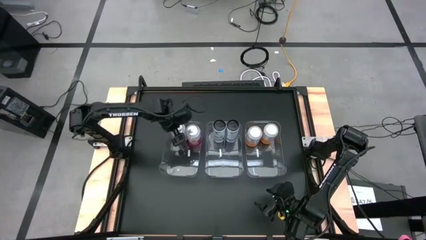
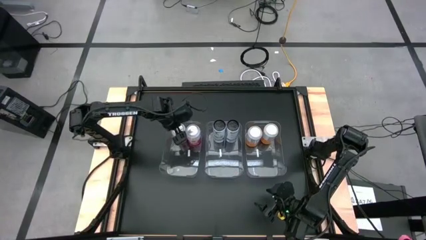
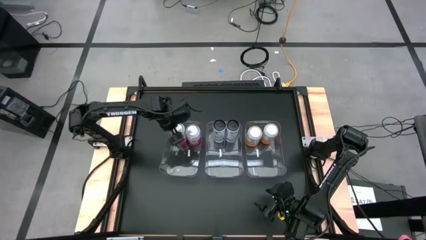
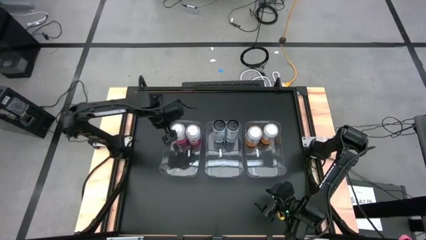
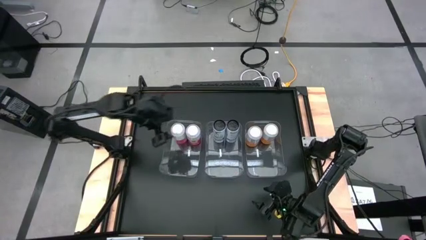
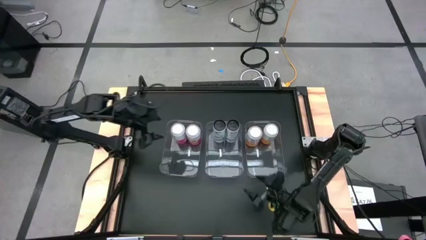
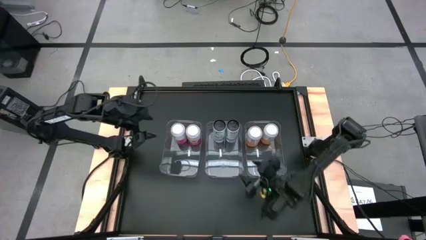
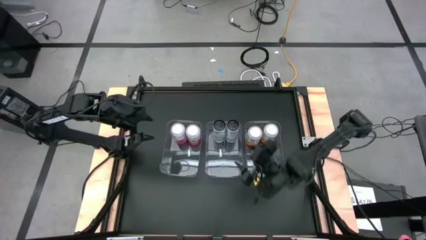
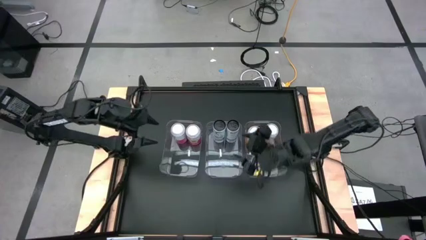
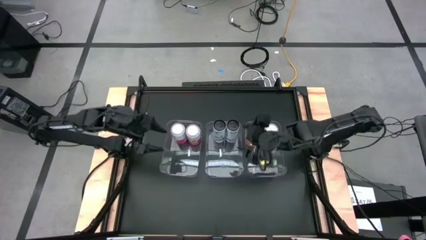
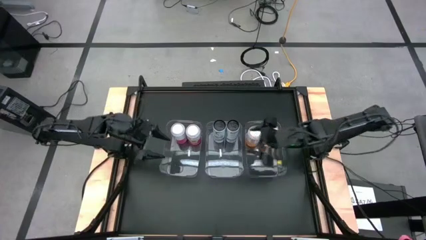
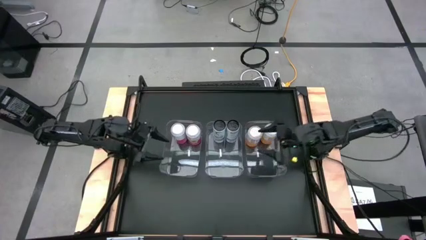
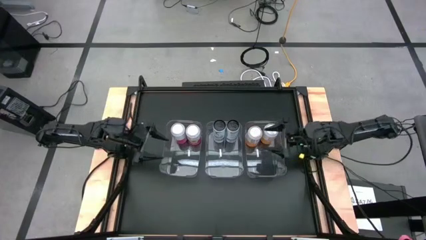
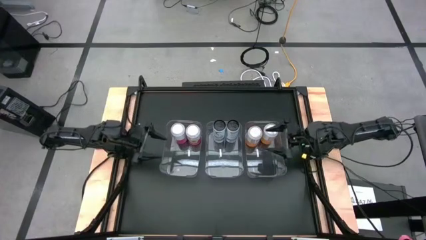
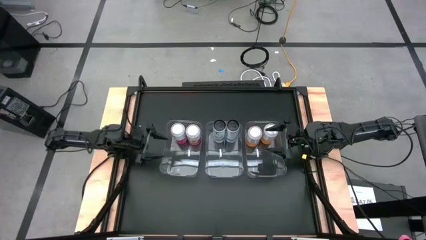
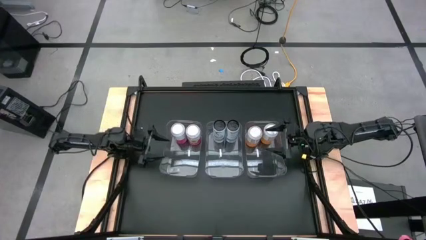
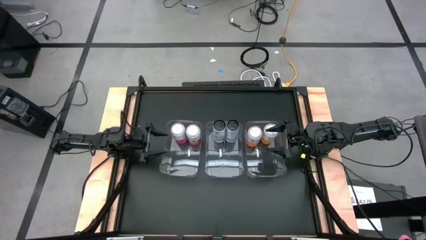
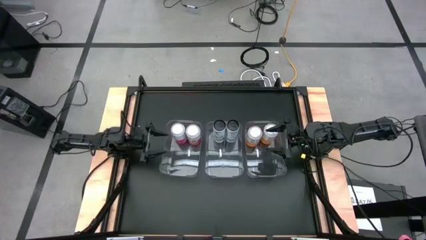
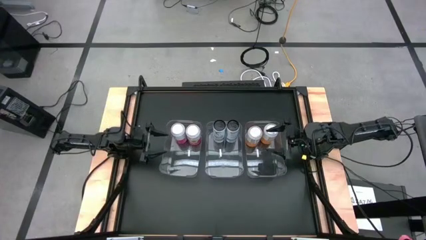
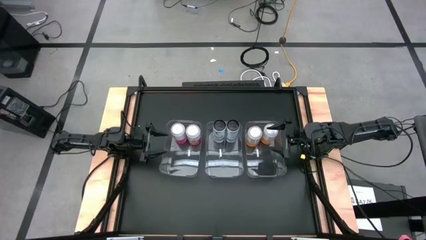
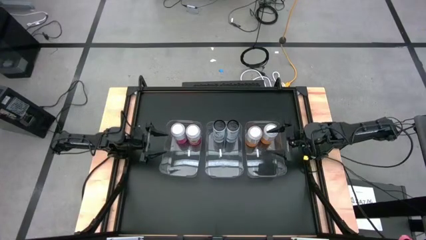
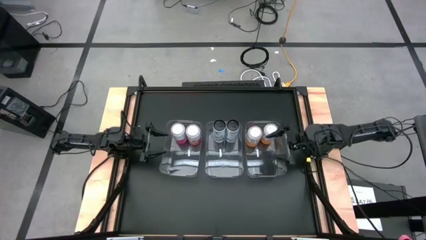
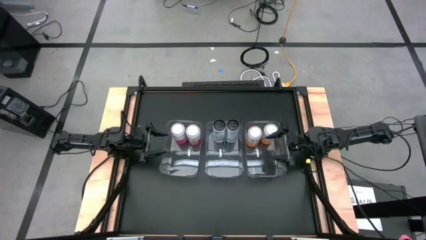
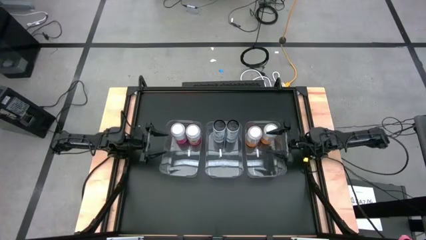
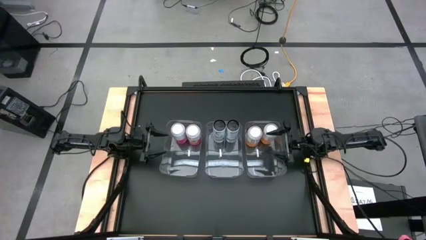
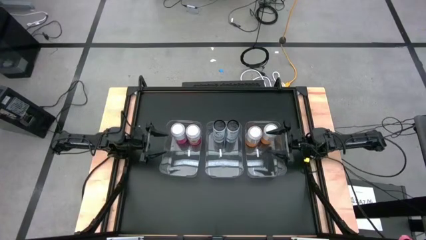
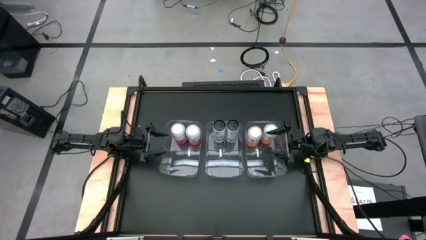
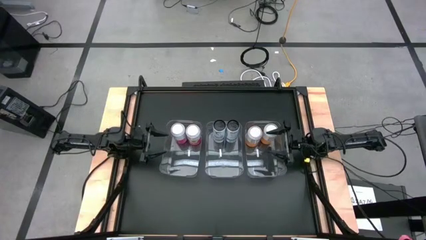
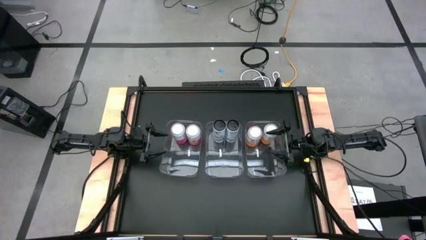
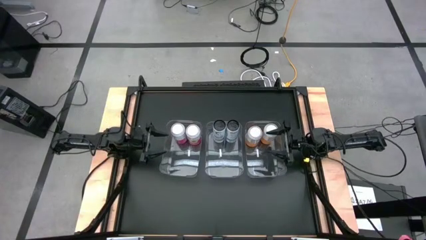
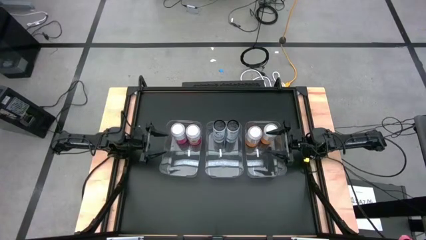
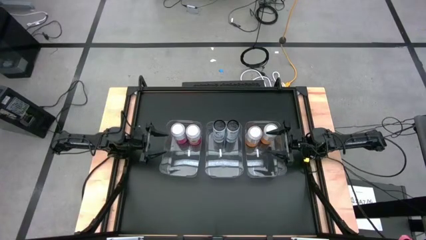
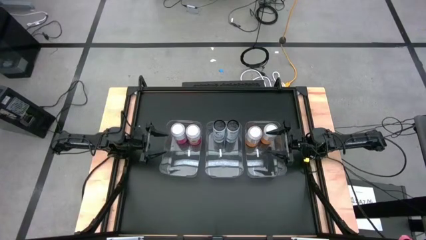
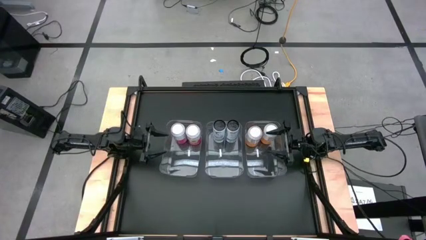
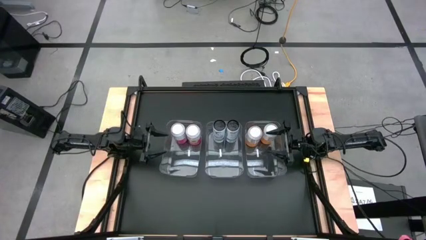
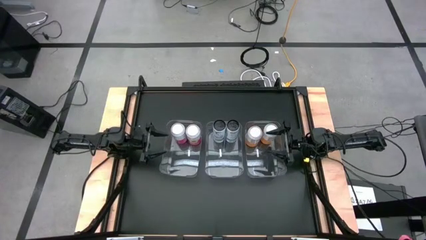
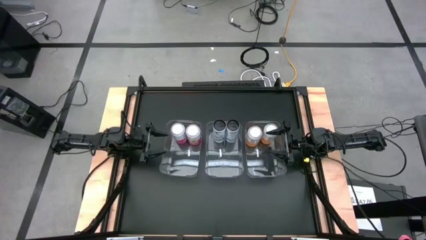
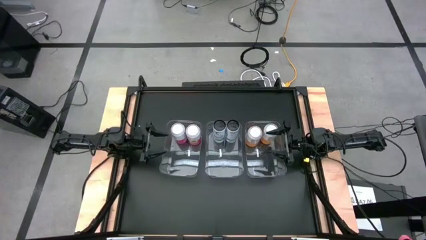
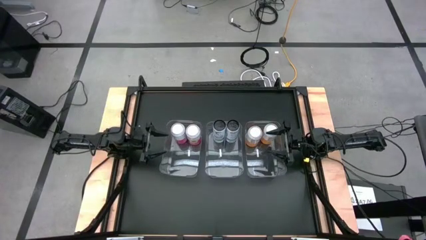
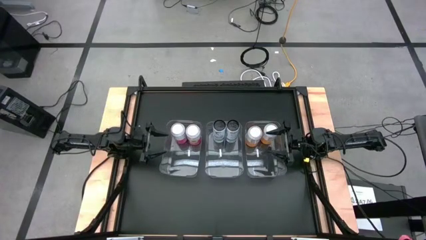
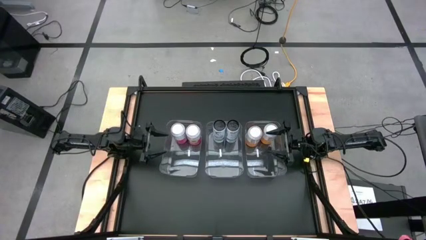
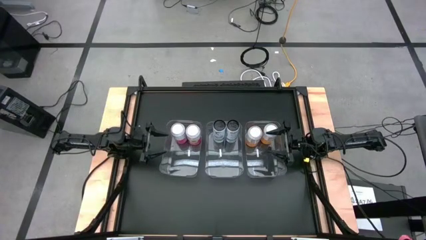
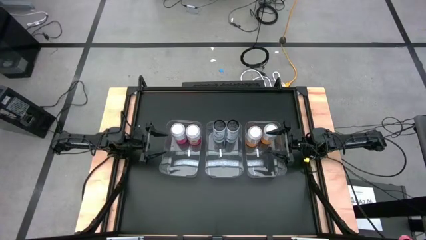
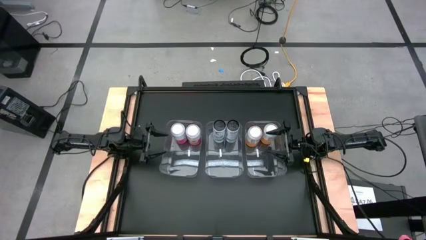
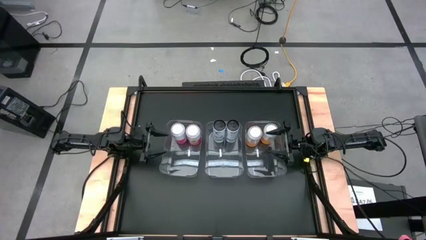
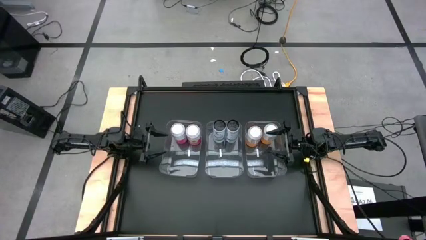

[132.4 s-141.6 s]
Task: Sort soda cans
Return to Home Position

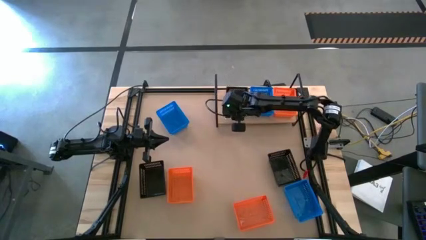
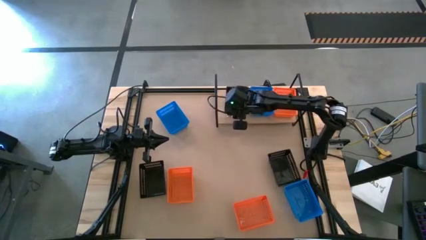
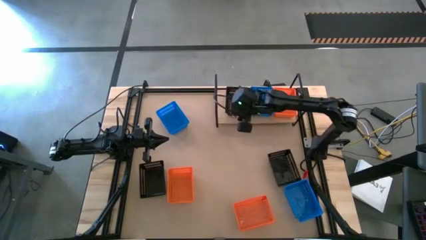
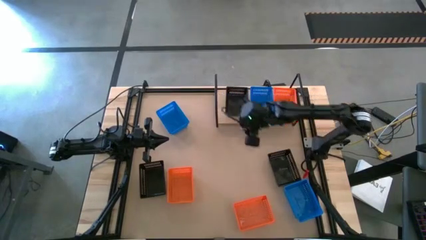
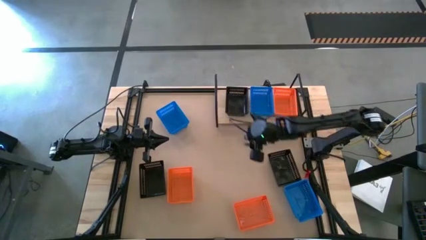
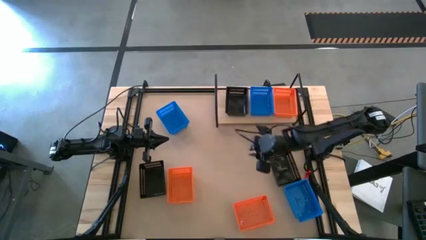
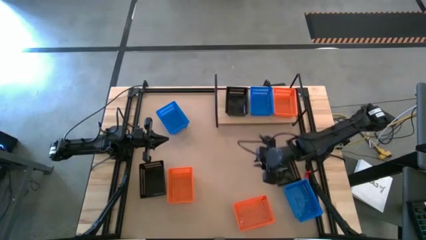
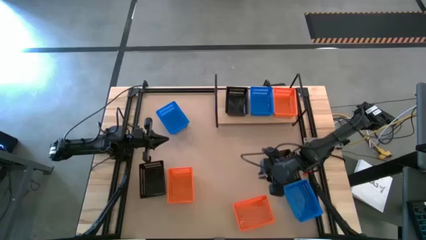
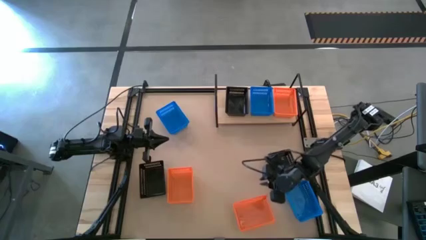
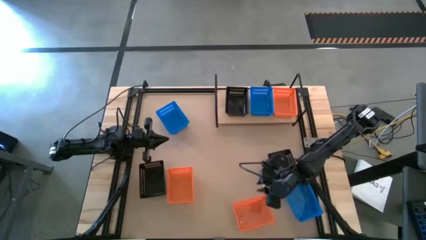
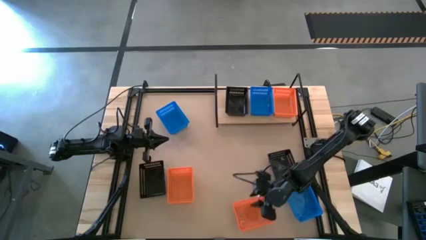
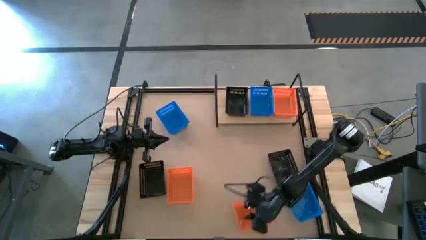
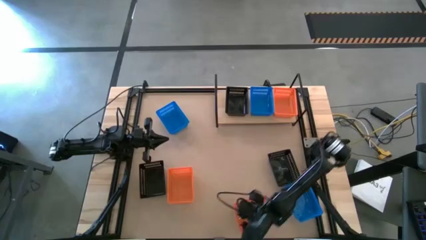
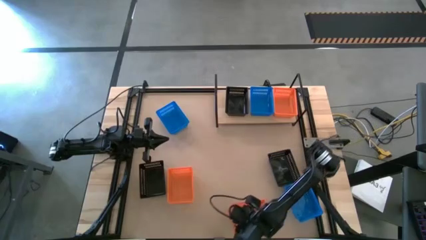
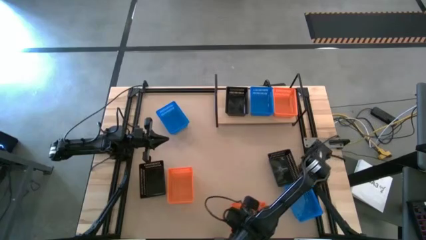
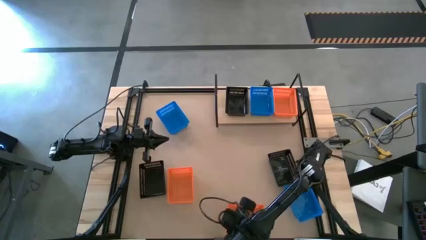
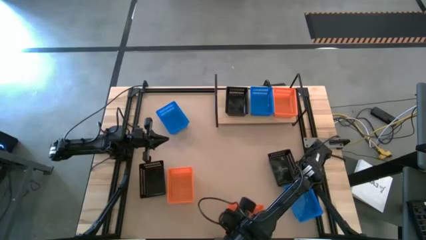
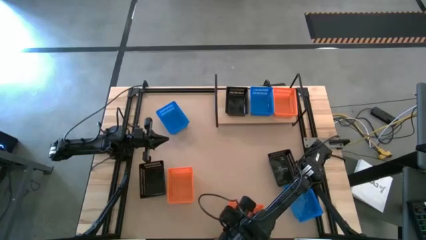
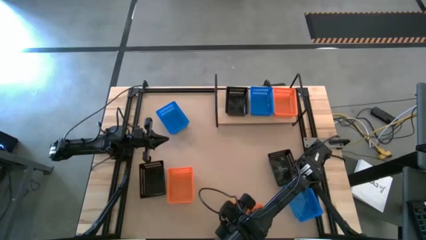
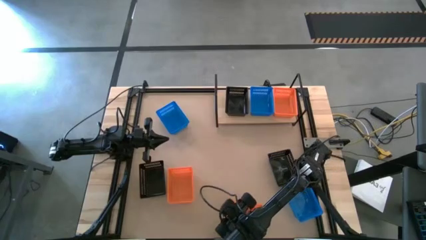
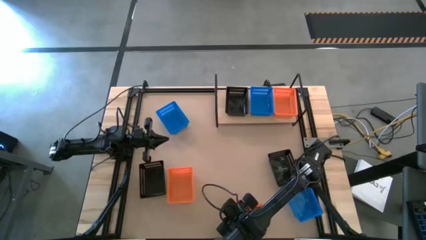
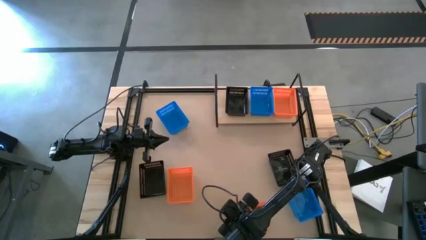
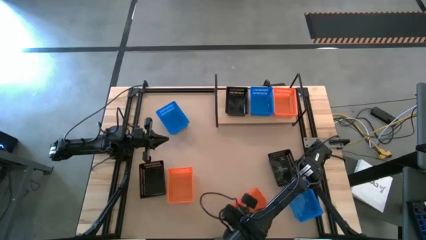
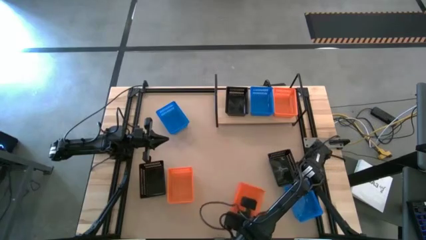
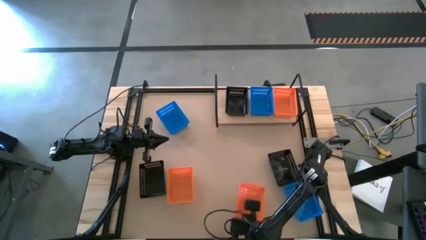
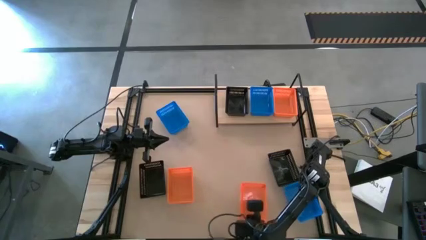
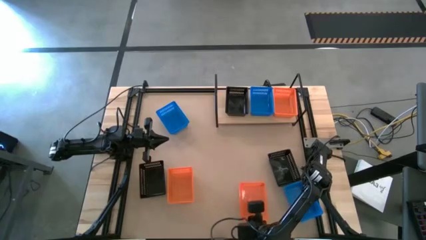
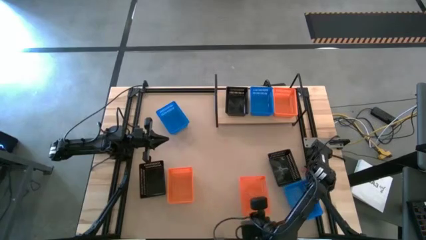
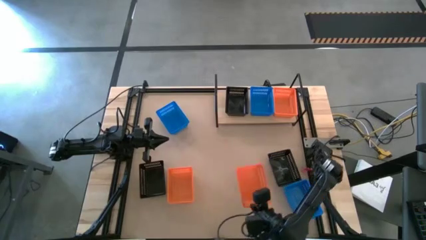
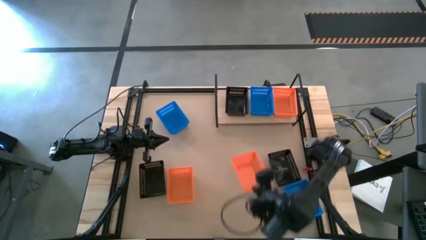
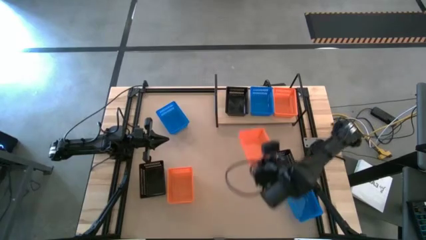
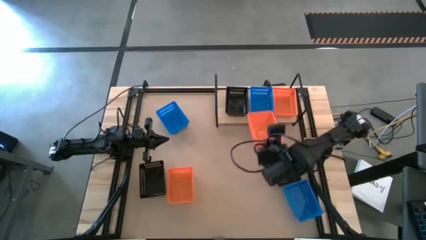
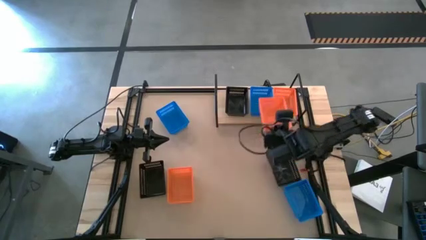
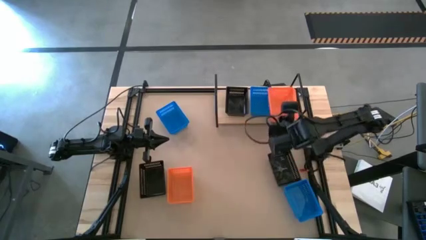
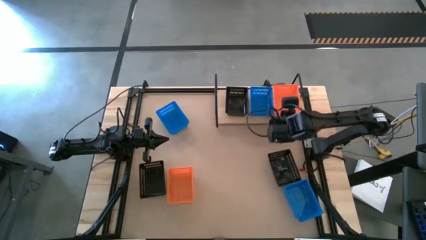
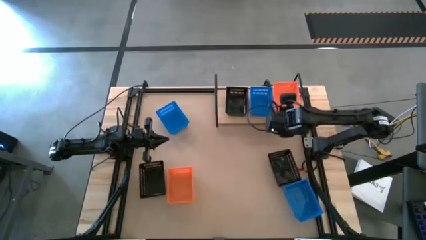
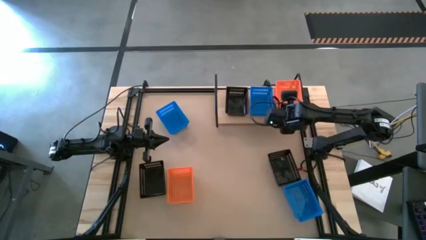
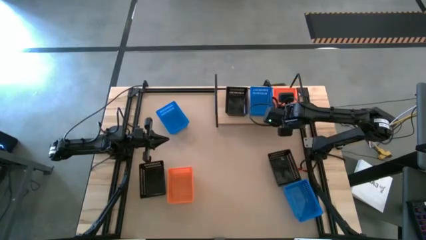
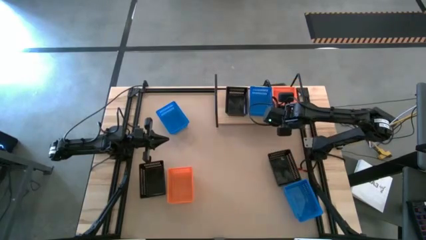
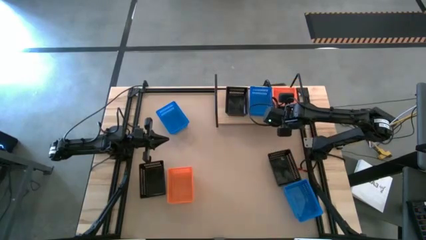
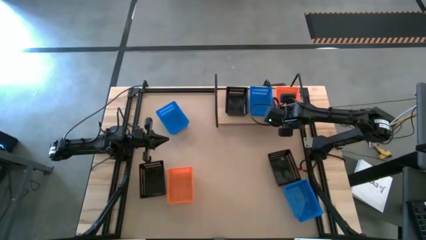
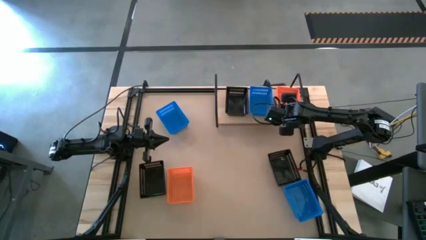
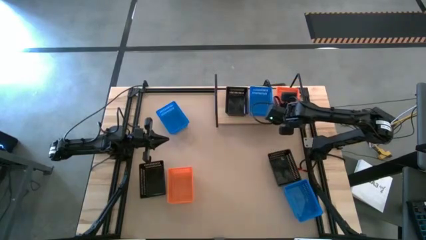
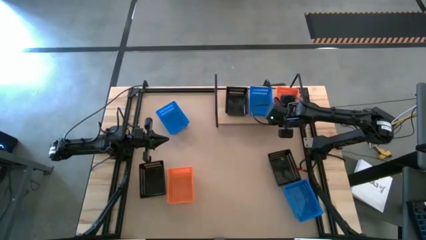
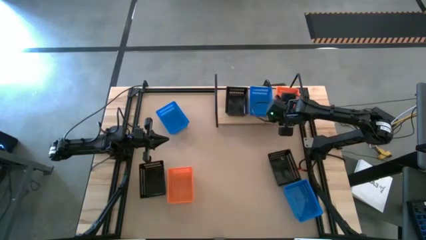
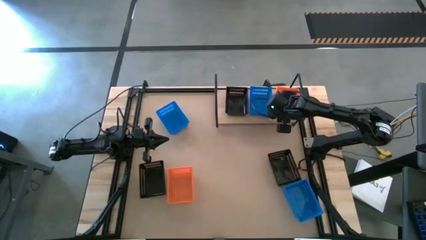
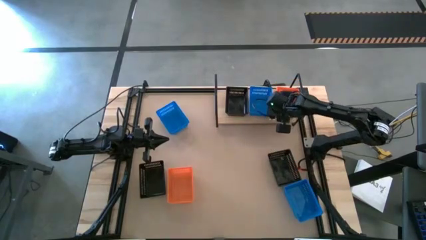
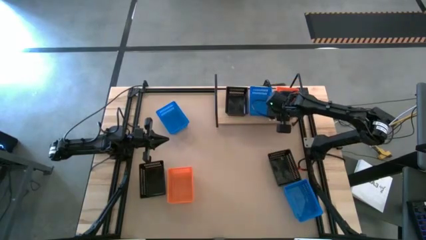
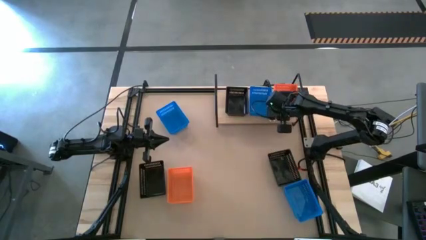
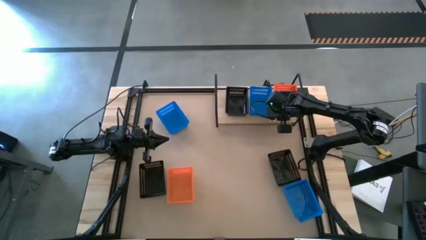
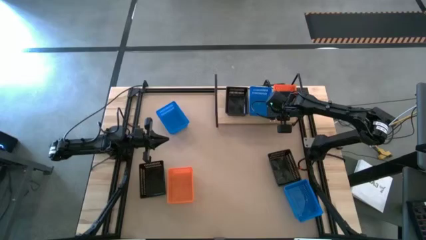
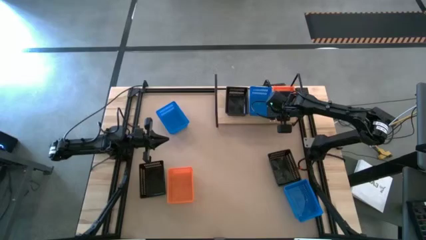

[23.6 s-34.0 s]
Task: Stack baskets on shelf by color
Stack the right orange bin on top of the other orange bin on the shelf
